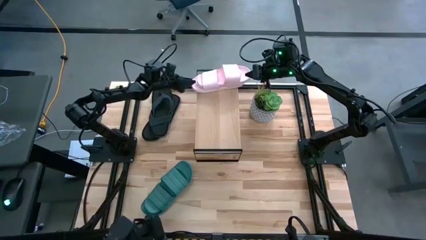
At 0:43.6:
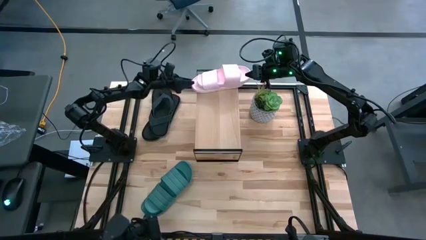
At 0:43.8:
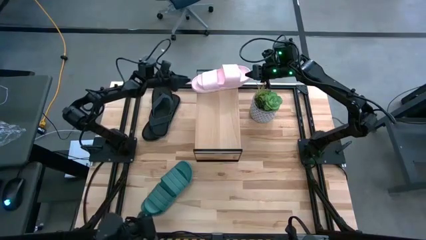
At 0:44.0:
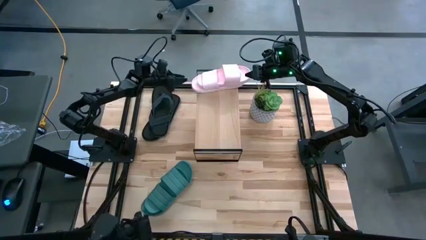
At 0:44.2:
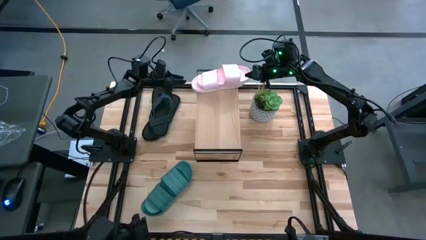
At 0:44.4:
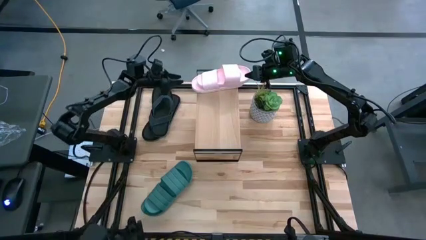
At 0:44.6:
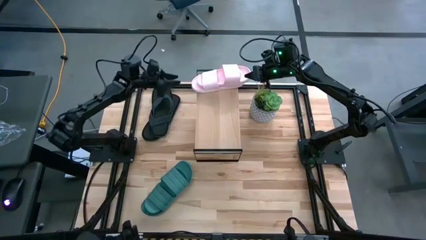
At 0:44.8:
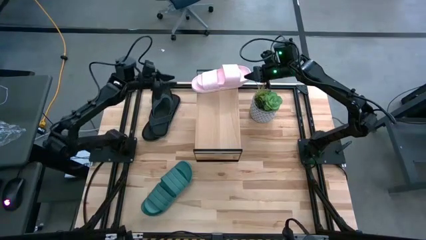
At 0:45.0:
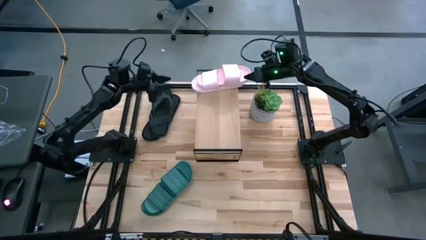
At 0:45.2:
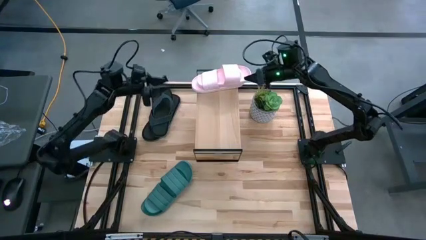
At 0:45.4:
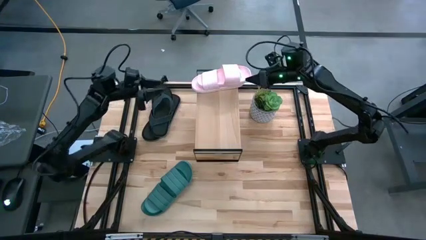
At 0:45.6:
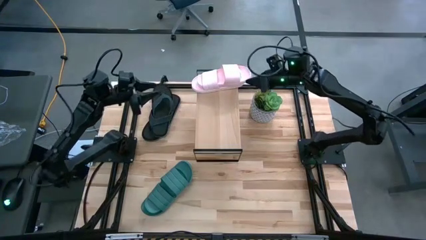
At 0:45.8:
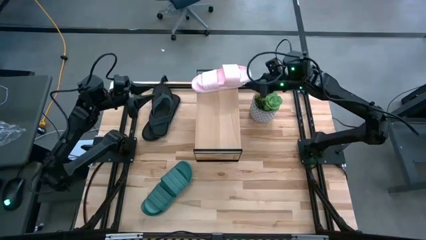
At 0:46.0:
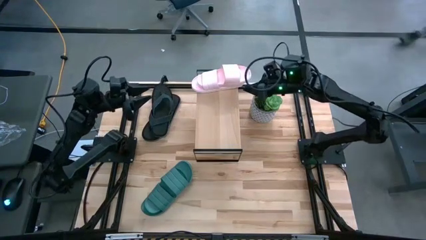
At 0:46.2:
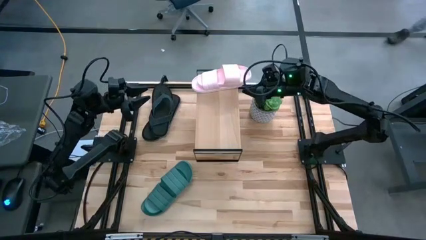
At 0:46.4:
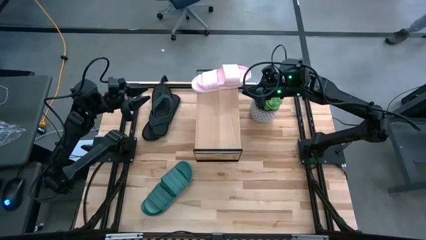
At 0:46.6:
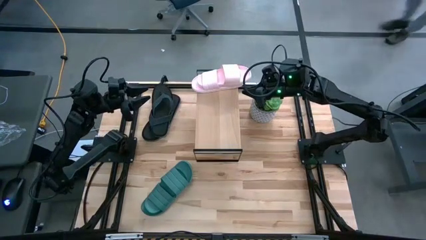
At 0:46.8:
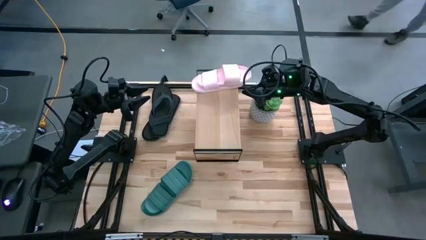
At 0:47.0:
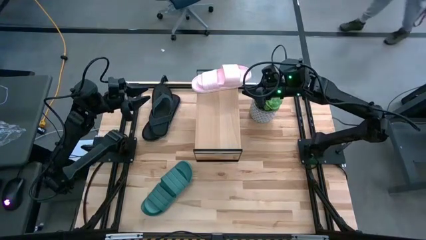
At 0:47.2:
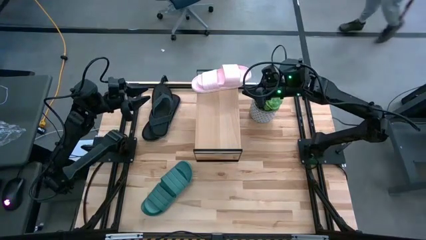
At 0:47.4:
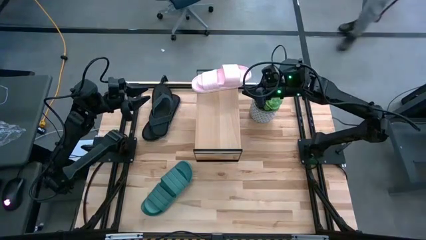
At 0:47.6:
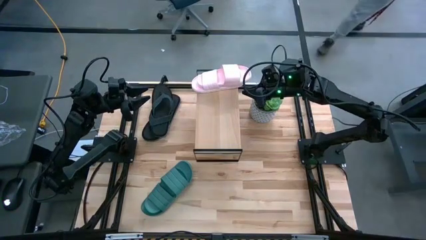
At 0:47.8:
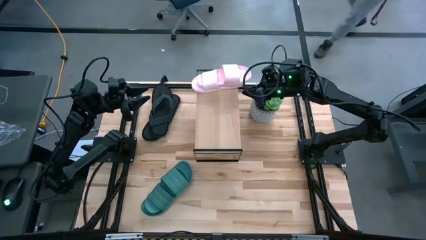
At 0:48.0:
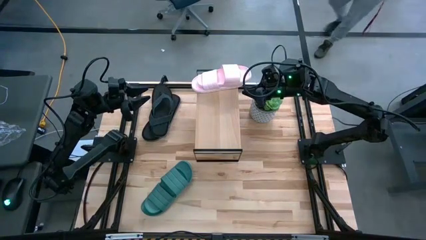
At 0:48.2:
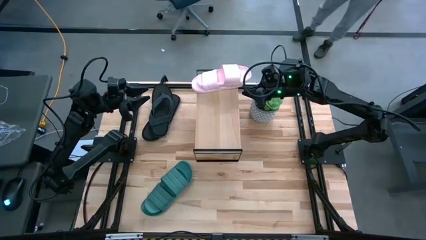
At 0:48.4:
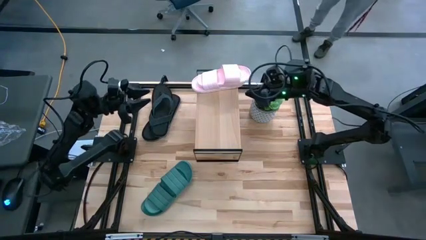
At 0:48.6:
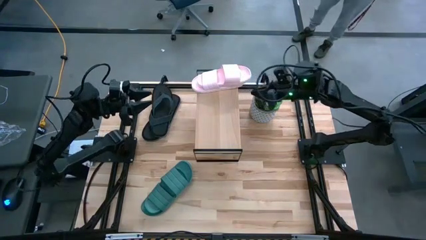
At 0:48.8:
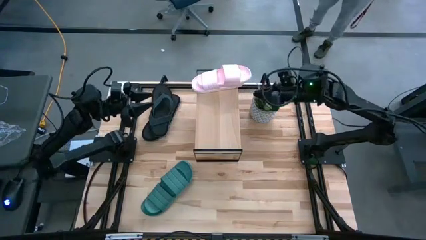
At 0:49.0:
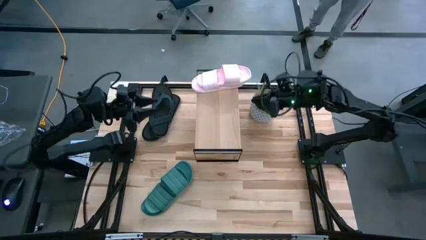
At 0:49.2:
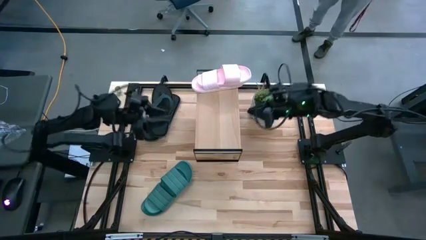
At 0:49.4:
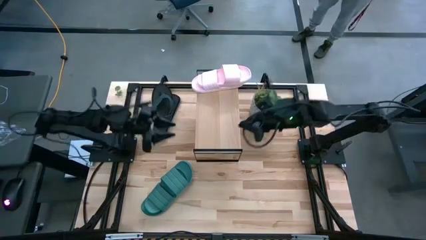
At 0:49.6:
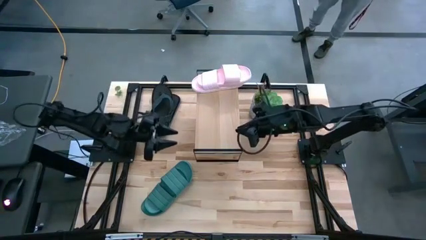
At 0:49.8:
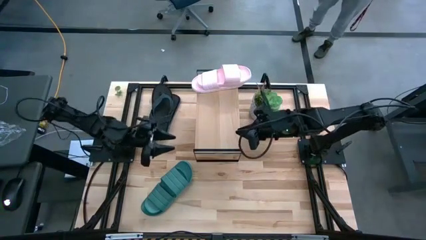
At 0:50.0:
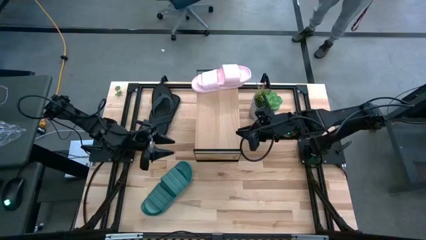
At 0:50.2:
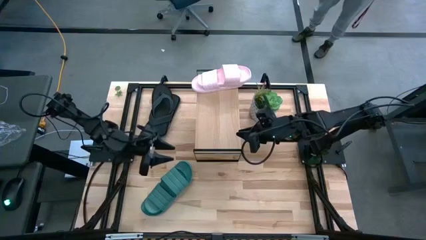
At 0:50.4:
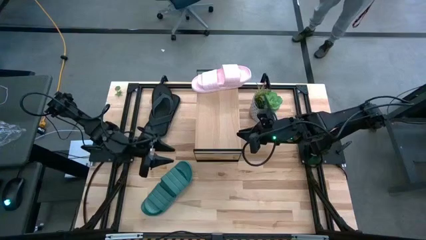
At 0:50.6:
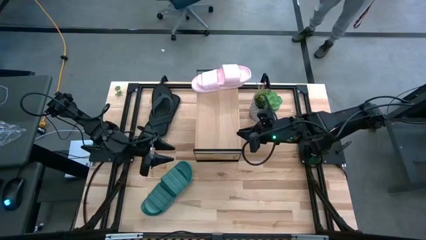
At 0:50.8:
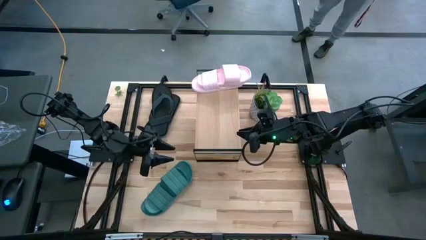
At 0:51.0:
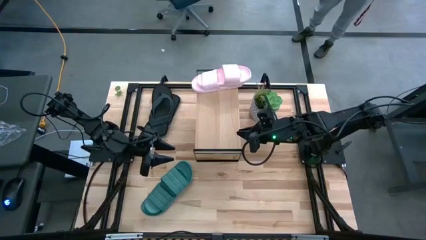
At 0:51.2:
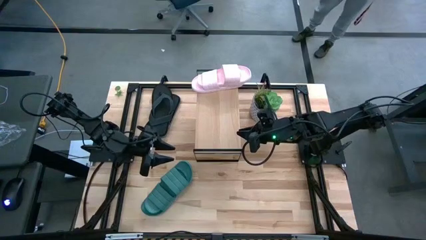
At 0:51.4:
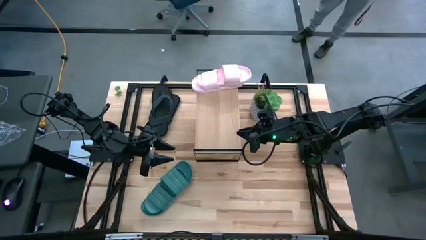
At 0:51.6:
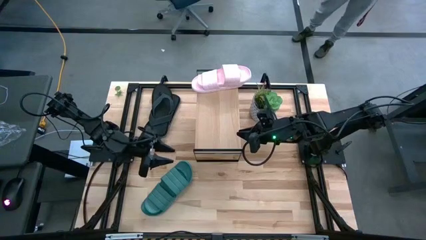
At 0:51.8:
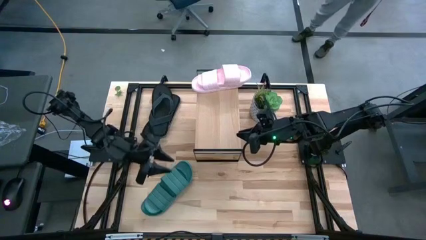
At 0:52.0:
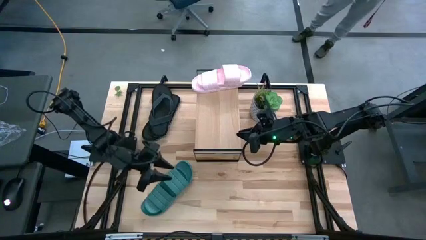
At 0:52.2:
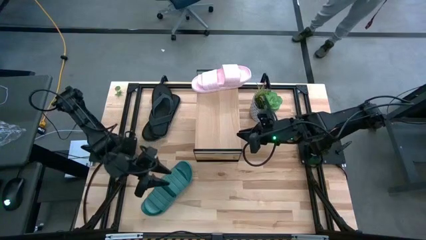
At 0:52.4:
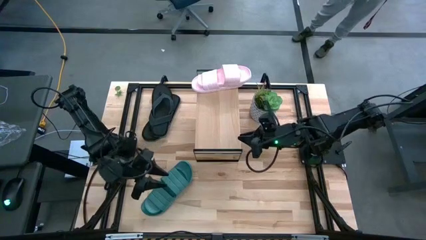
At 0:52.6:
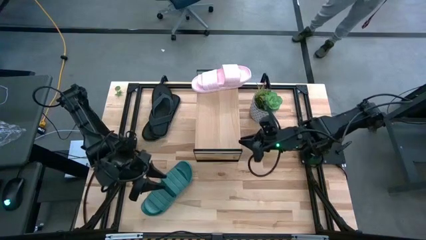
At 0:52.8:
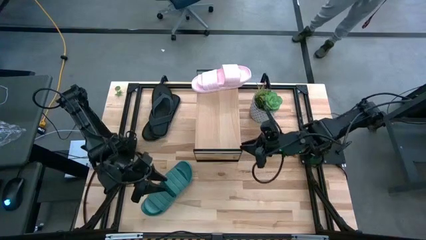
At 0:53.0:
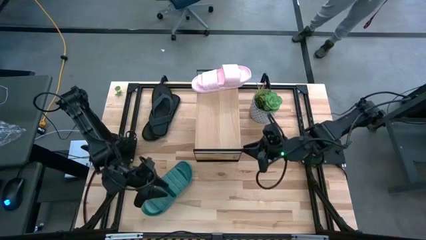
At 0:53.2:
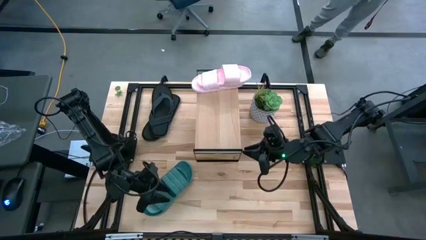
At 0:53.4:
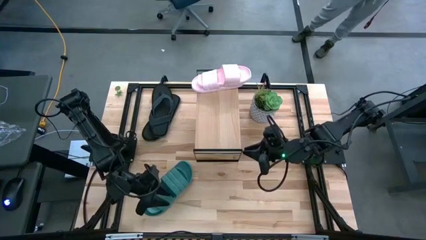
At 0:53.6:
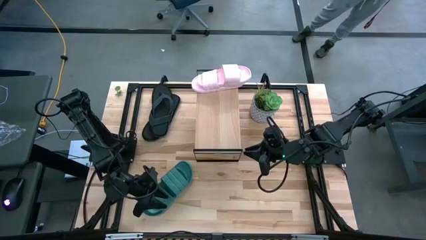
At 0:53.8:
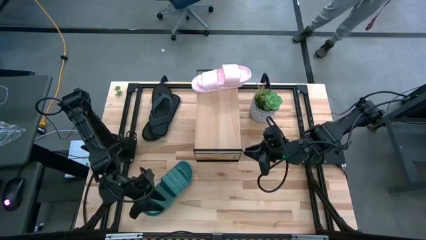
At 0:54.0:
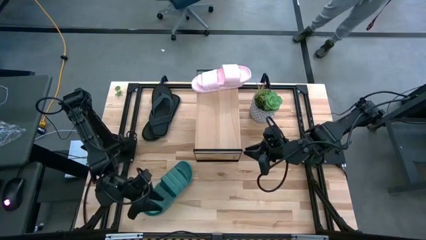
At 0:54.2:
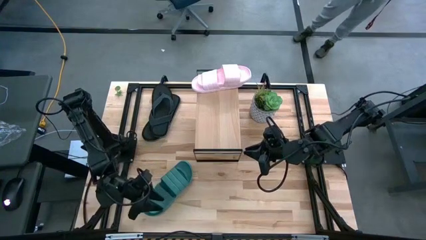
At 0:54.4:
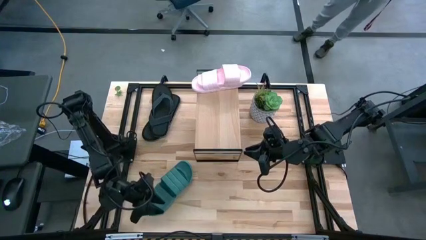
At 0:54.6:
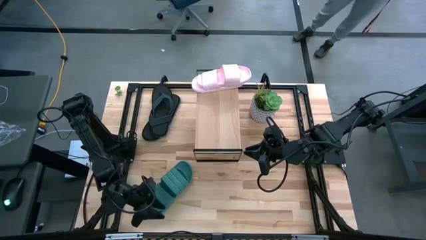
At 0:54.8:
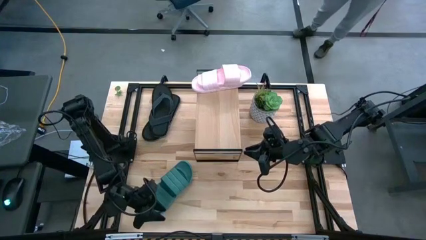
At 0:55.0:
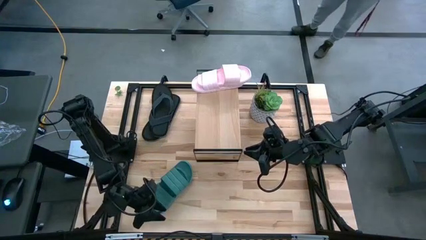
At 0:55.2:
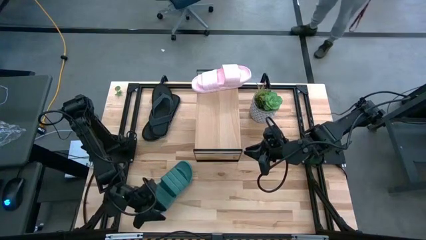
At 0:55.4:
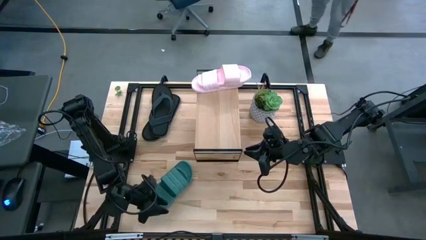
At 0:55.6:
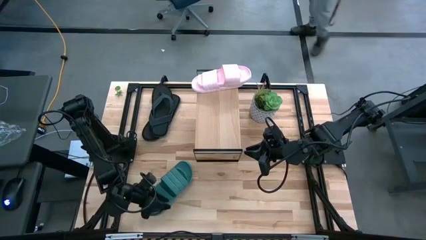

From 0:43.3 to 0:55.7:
Task: Pick and place slippers onto the shelf
Put the green pair of slippers on the shelf
